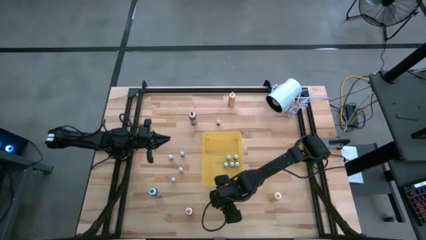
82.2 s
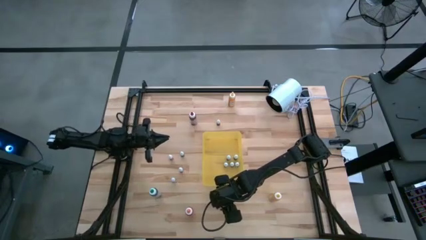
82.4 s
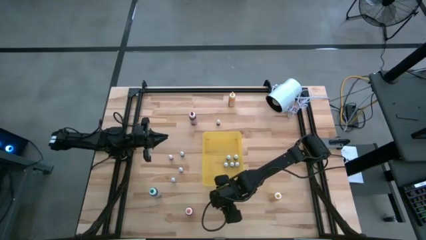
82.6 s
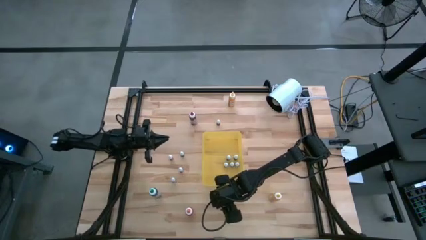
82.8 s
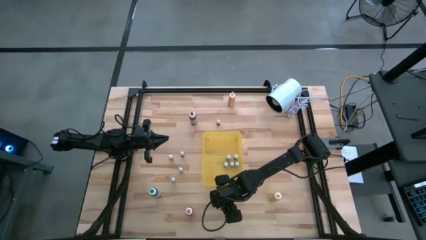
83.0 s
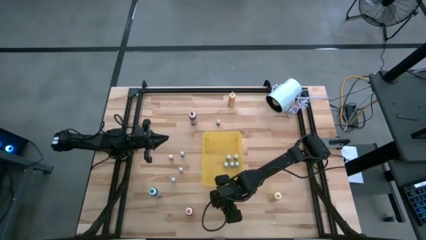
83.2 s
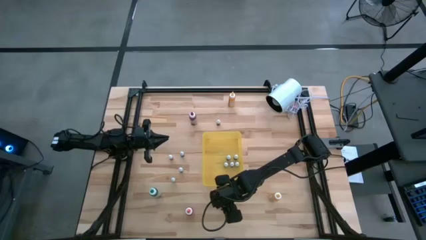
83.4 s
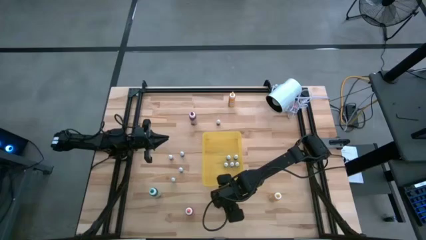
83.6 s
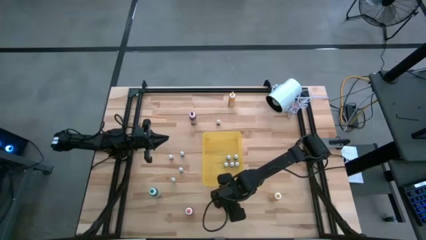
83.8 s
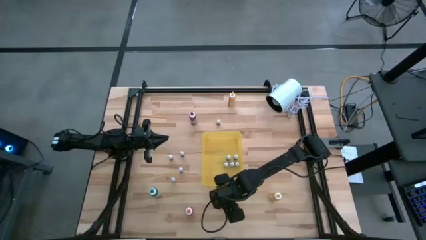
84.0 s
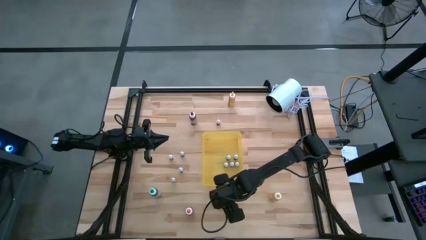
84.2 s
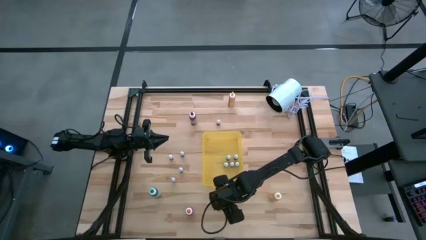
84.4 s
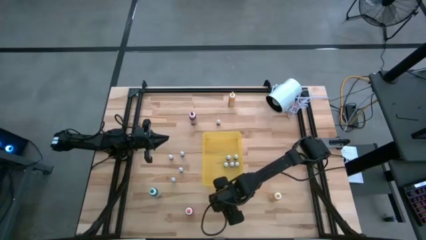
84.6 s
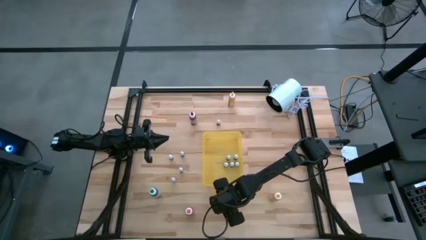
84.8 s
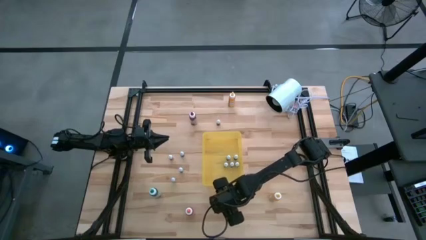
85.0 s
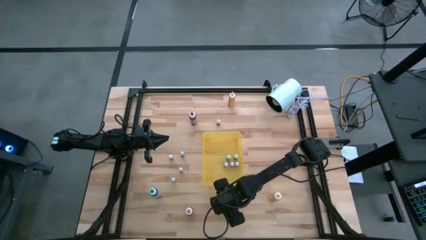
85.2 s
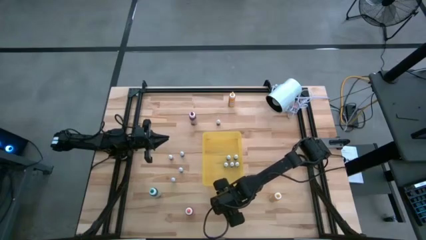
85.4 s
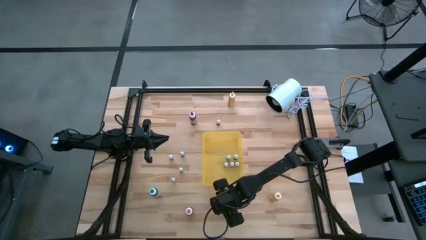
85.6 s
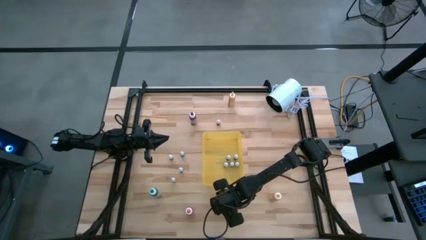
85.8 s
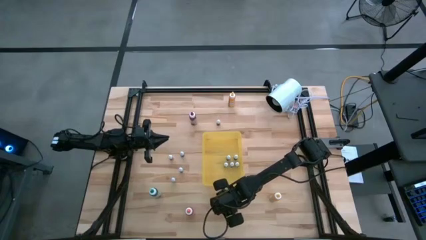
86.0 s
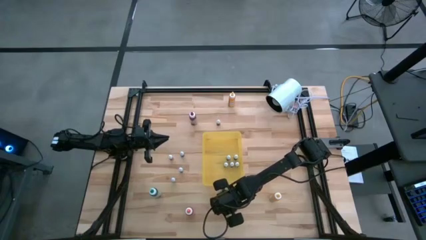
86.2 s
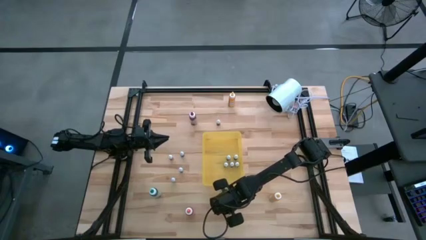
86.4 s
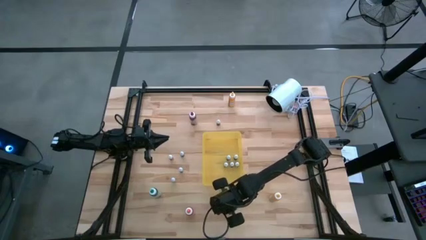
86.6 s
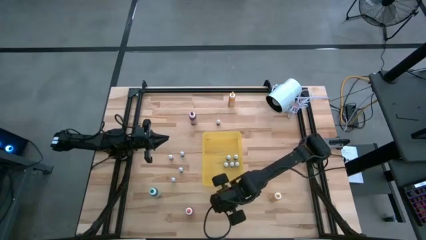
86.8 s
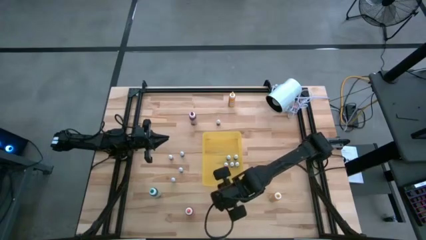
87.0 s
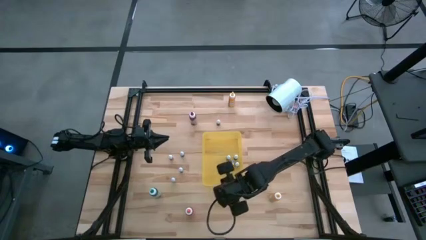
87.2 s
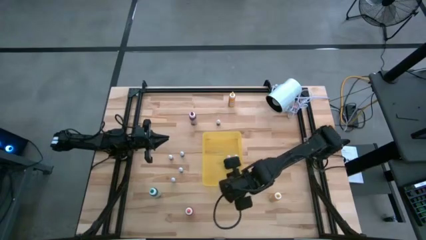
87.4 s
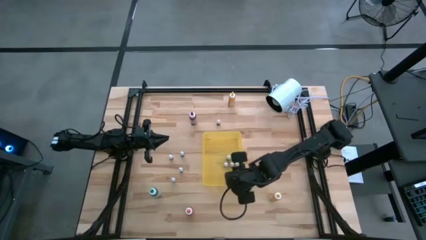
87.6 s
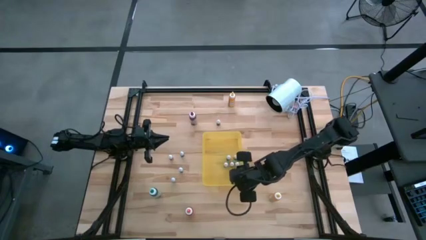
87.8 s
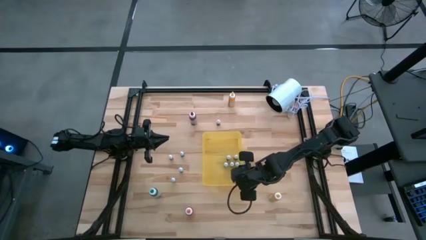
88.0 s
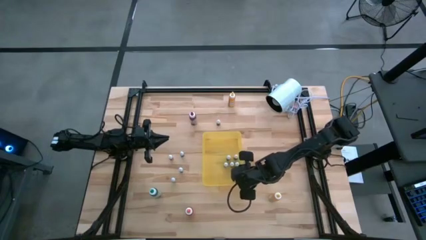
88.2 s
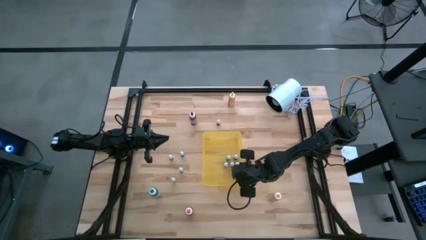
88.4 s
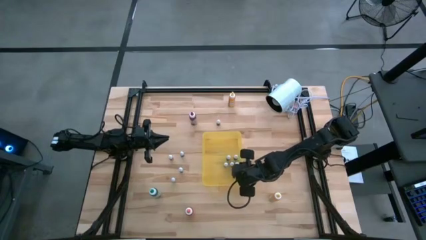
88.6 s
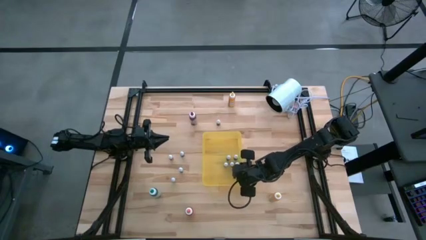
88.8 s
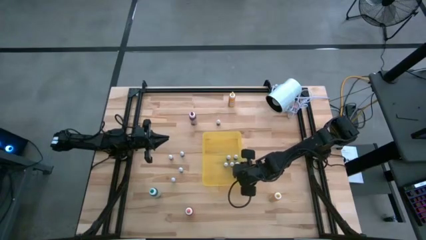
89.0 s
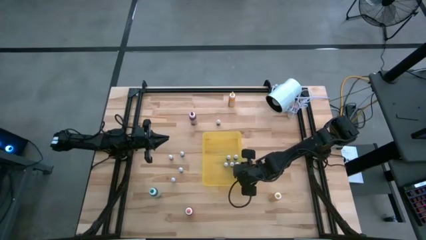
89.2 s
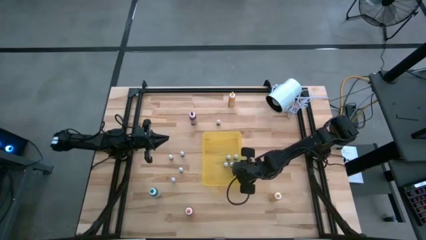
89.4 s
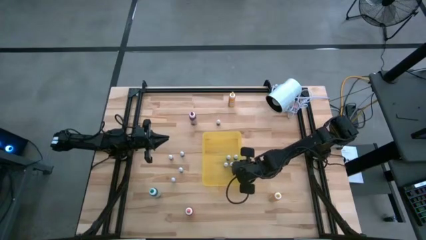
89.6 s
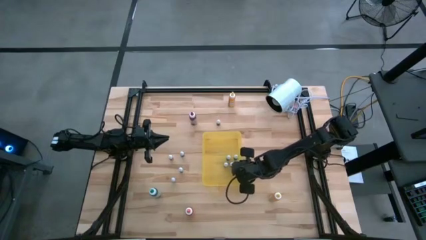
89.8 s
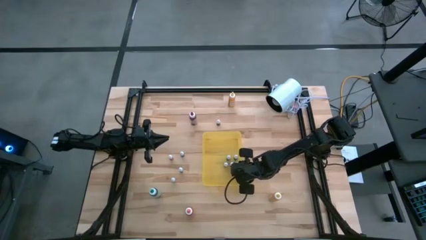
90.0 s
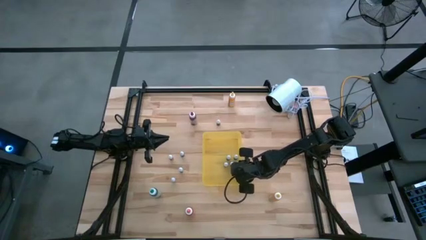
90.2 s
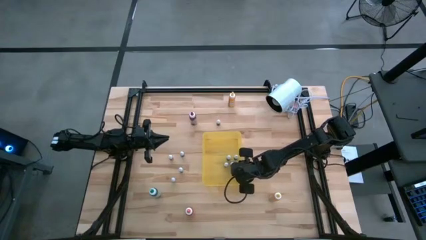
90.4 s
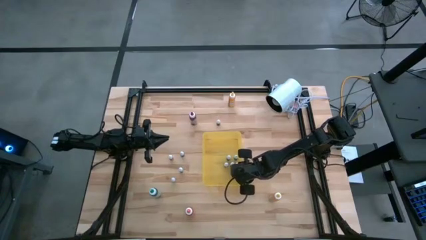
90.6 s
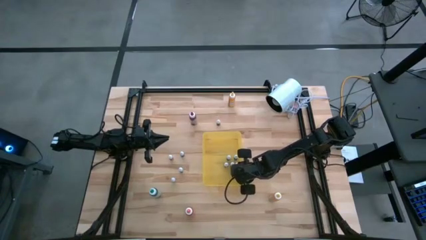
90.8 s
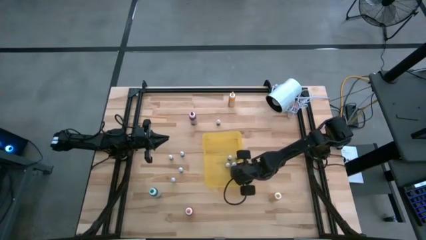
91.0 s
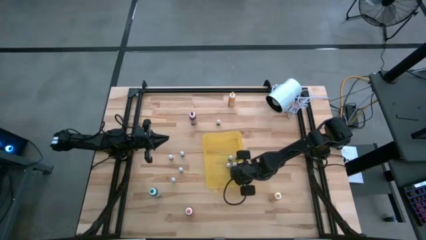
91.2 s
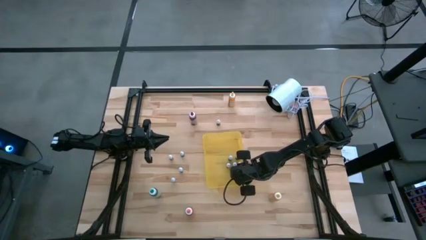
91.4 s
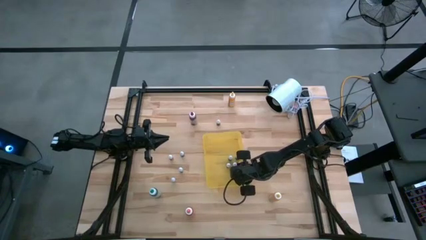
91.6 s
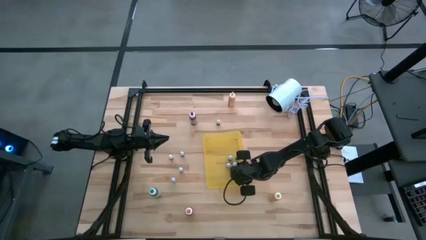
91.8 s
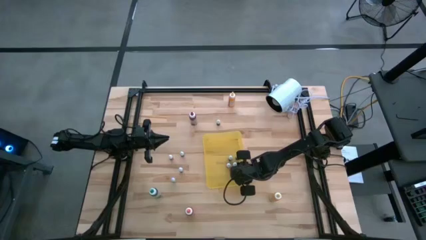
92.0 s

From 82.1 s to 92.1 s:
Task: Pick & Place food coloring
Put the bottom small red food coloring bottle into the yellow bin
